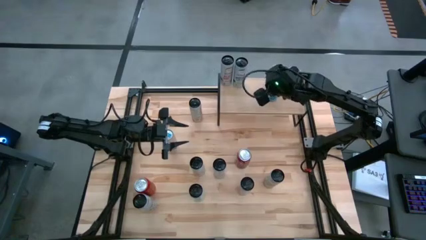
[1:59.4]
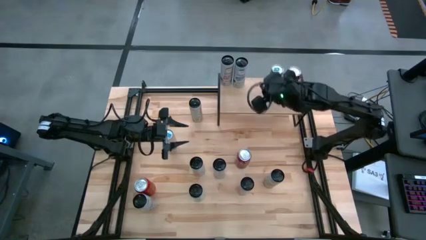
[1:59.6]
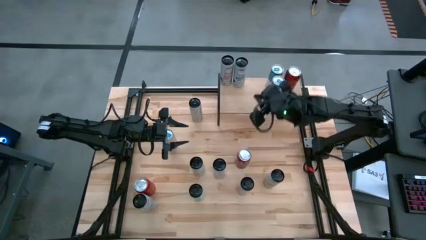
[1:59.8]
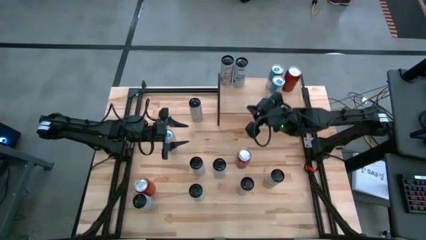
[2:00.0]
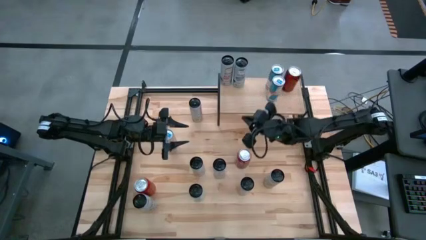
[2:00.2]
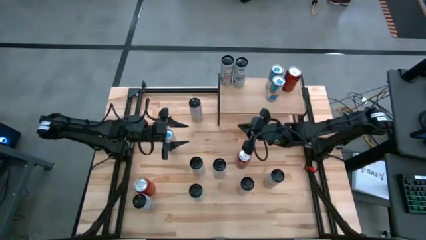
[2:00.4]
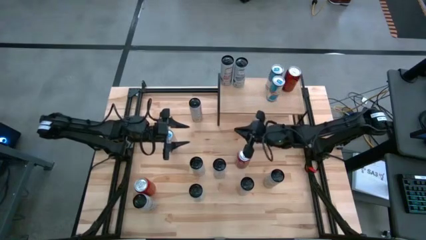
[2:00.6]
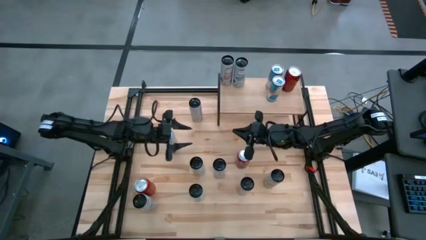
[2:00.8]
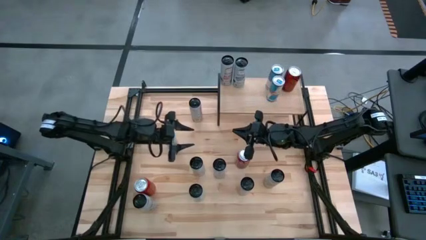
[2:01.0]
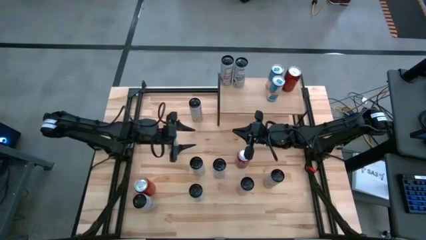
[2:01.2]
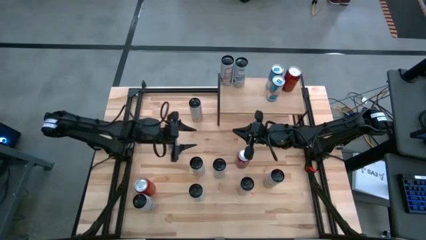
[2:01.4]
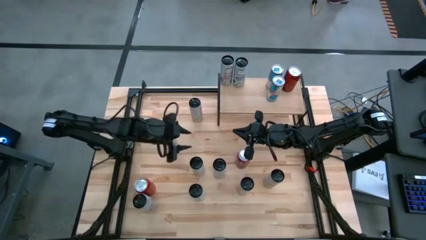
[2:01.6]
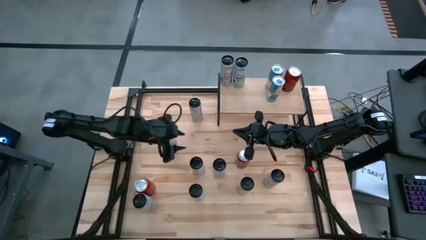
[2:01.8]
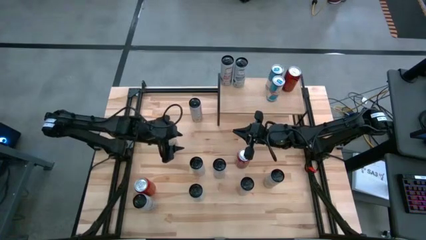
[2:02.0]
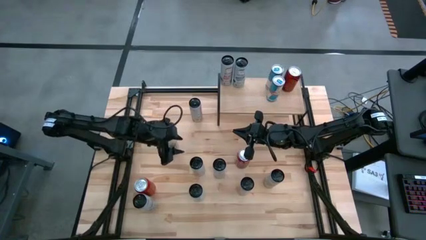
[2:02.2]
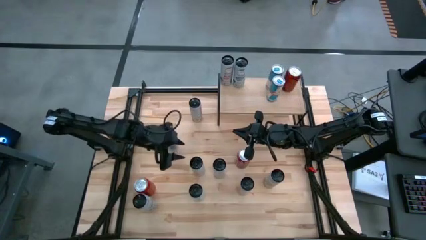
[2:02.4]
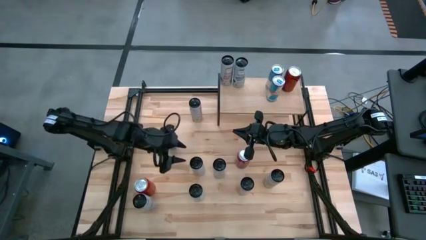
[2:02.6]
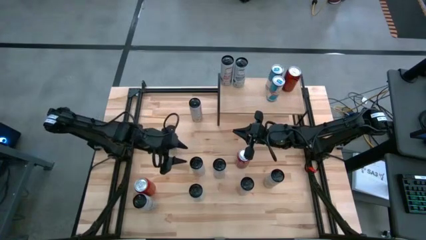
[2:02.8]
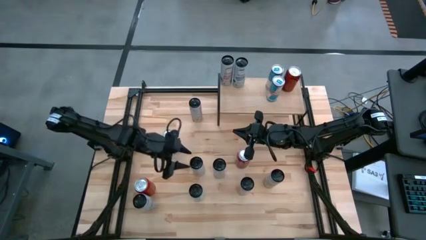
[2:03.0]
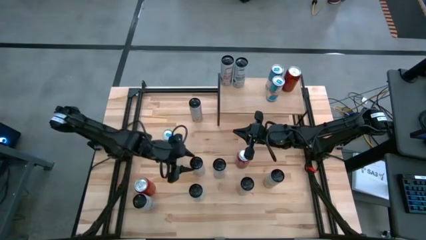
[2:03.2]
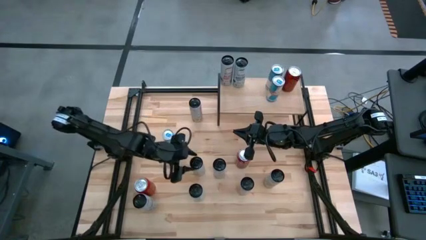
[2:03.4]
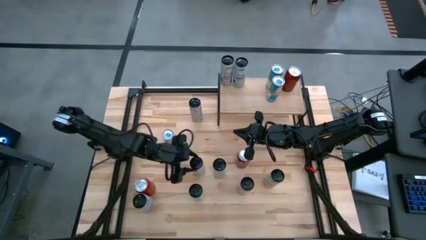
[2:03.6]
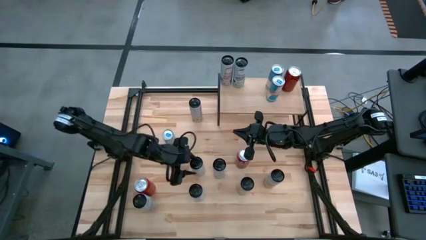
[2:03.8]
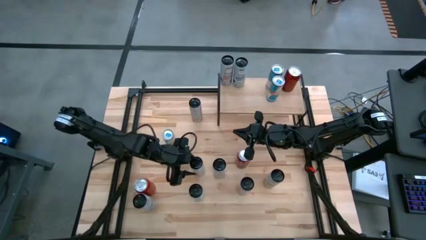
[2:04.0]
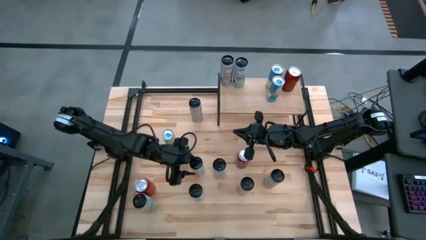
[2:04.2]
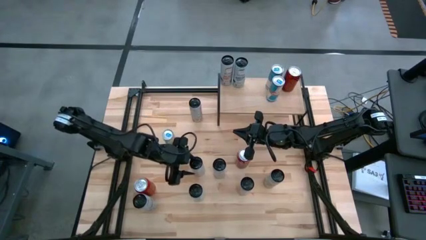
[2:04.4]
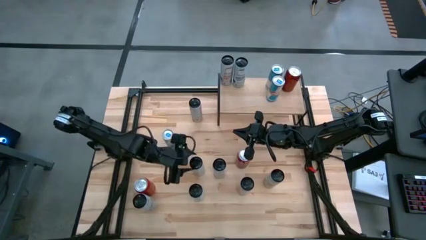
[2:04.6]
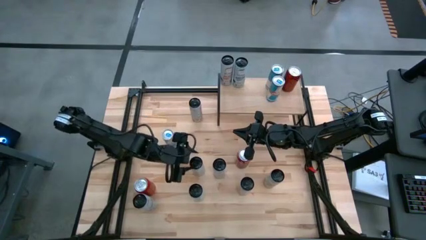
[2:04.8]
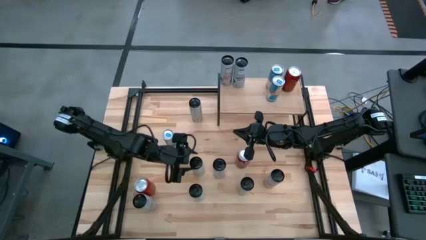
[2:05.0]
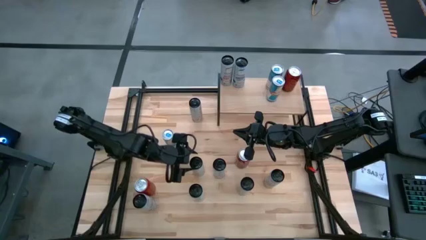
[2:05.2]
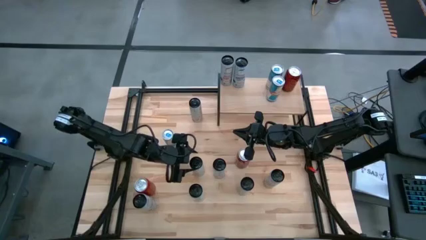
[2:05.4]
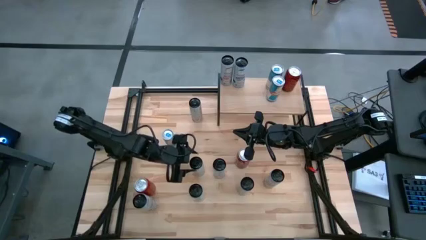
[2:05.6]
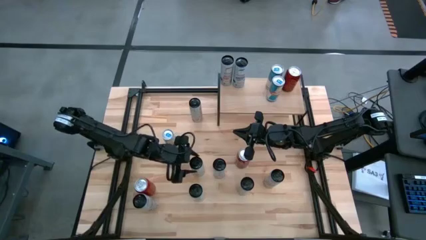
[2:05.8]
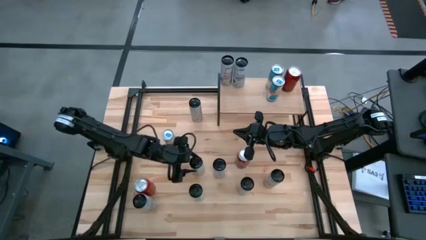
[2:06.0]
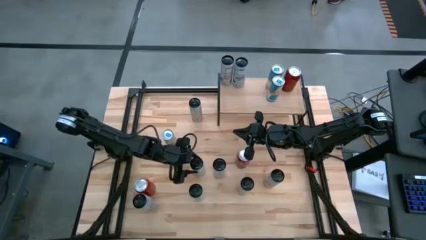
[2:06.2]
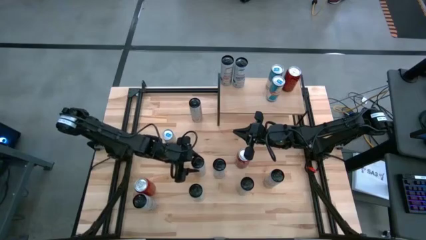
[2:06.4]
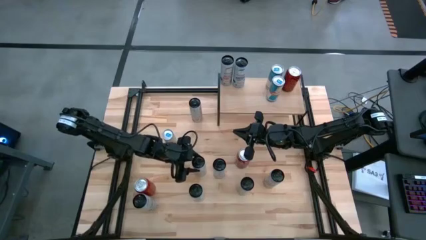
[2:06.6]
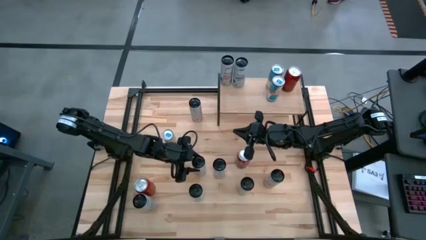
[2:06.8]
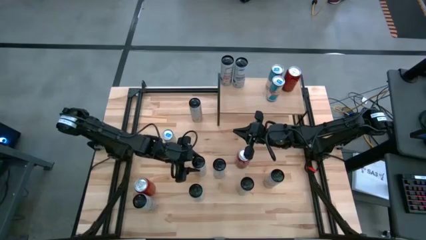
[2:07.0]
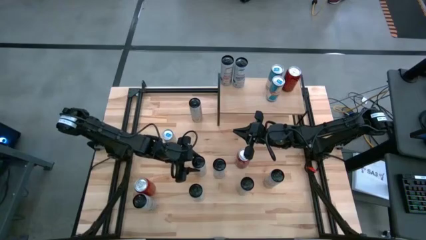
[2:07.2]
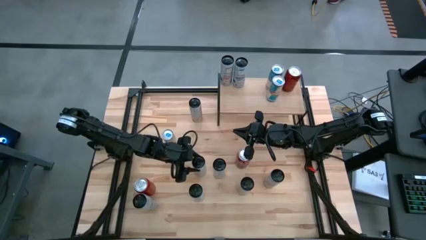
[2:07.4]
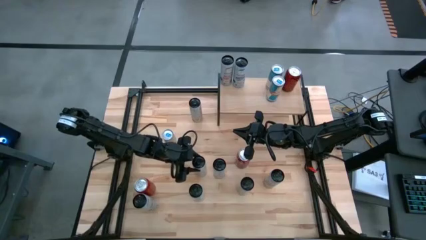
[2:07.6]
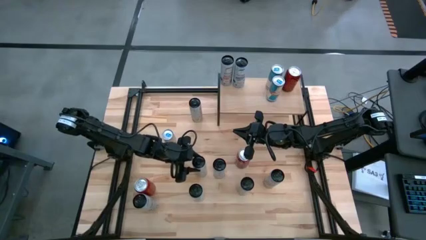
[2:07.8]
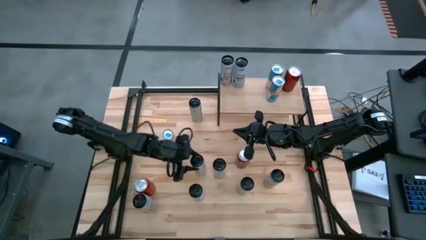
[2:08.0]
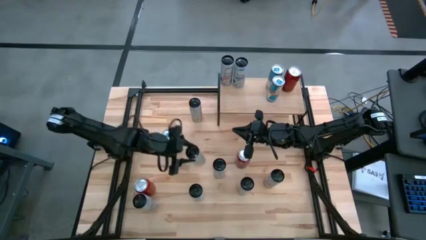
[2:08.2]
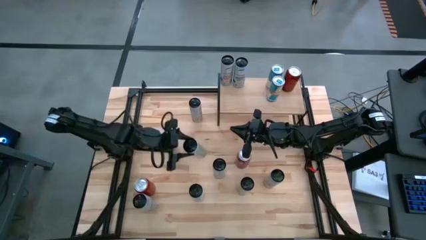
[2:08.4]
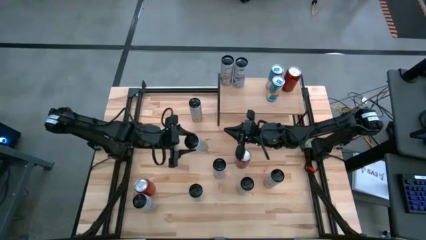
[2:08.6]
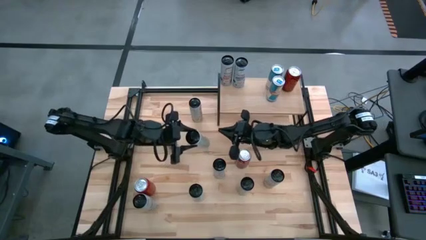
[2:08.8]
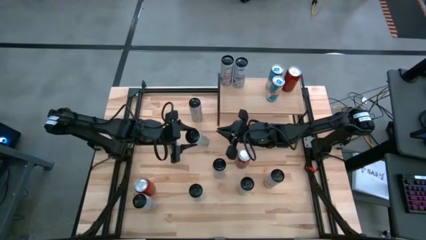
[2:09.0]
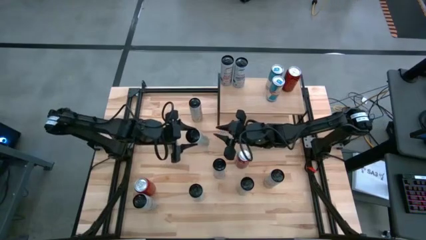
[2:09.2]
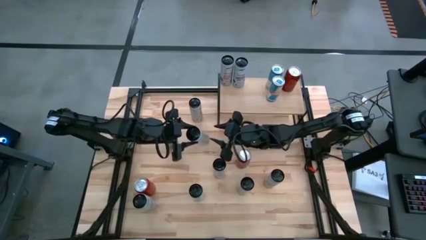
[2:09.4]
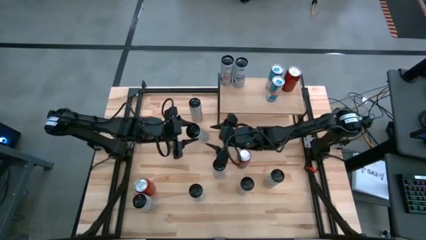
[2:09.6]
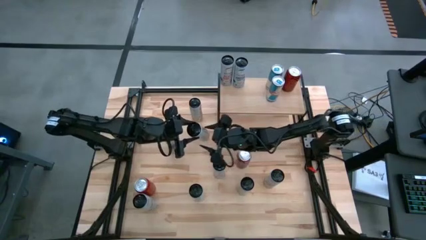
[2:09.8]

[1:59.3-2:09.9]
Task: Place canned beverage on shelf
Put the middle white yellow soda can on the shelf

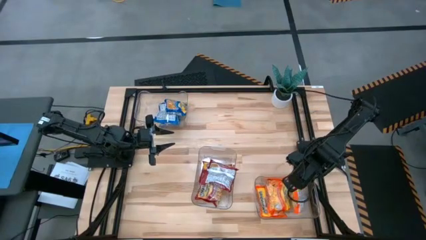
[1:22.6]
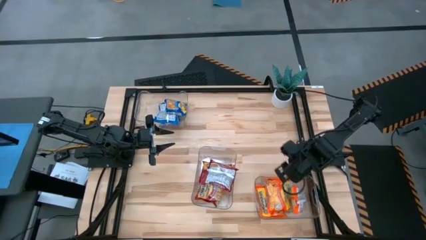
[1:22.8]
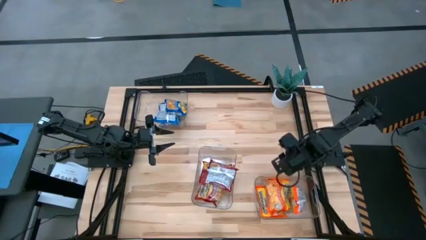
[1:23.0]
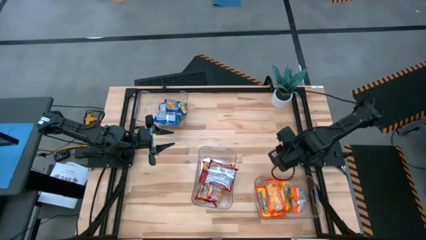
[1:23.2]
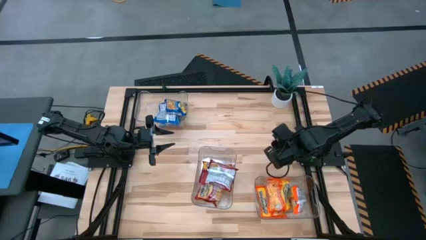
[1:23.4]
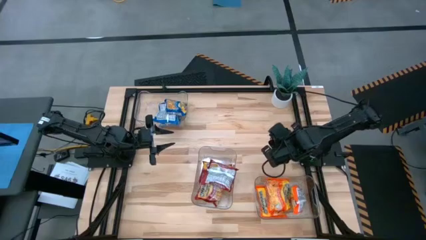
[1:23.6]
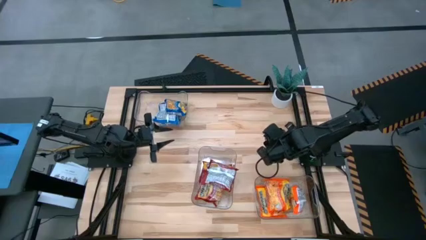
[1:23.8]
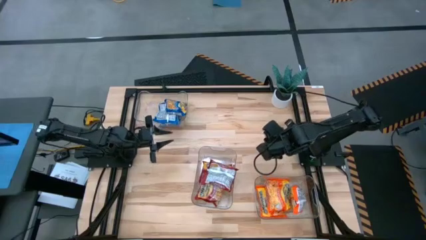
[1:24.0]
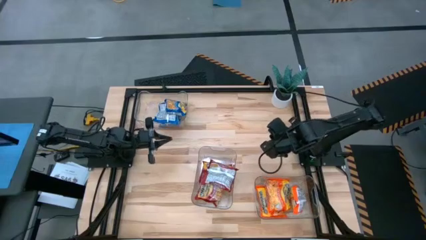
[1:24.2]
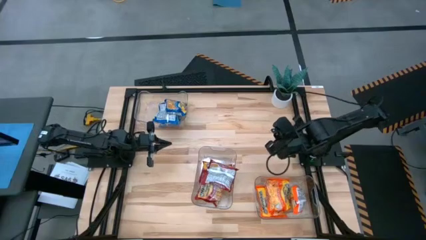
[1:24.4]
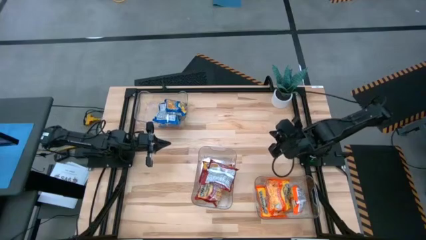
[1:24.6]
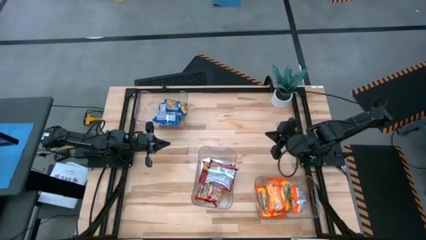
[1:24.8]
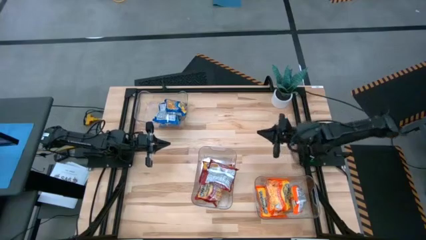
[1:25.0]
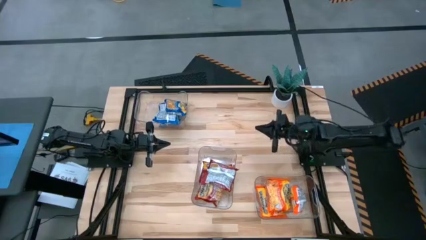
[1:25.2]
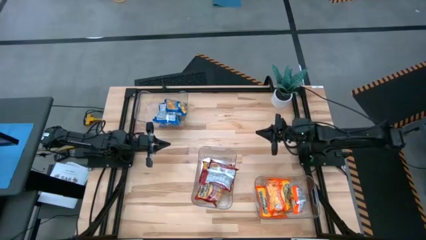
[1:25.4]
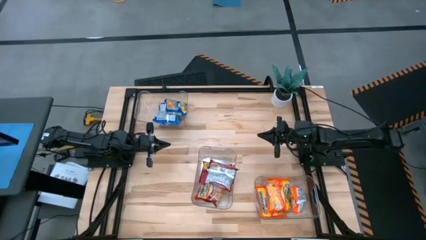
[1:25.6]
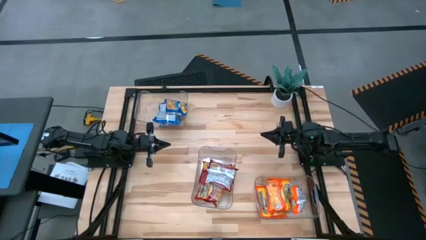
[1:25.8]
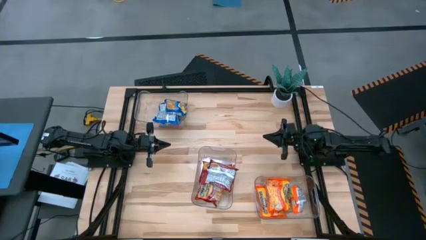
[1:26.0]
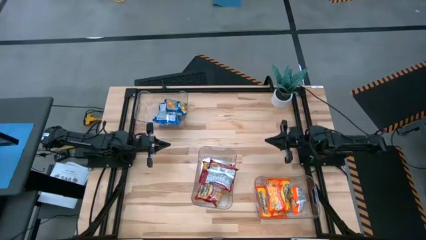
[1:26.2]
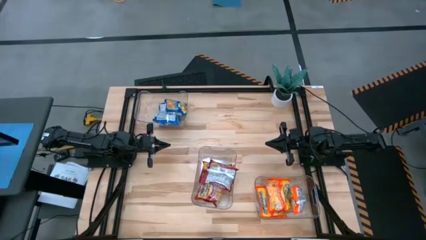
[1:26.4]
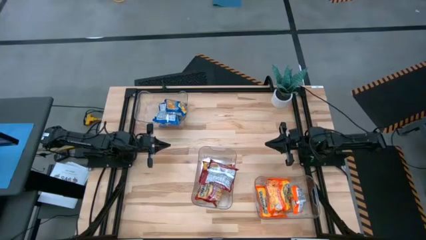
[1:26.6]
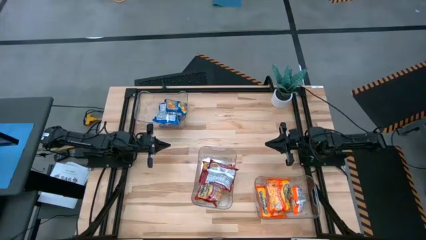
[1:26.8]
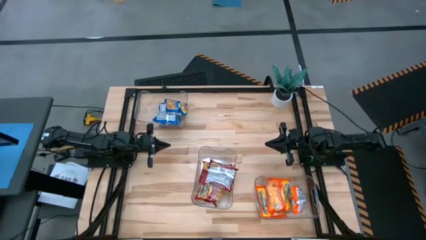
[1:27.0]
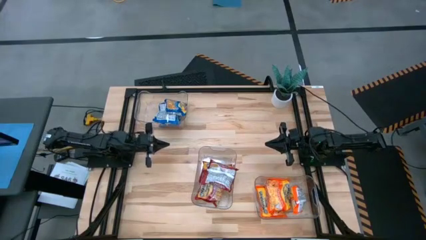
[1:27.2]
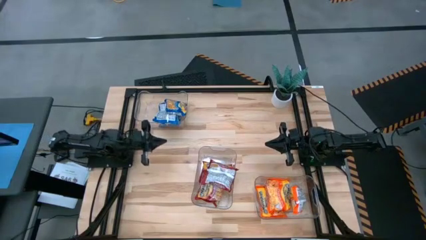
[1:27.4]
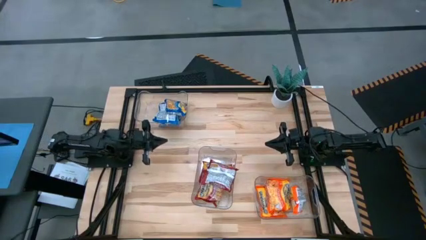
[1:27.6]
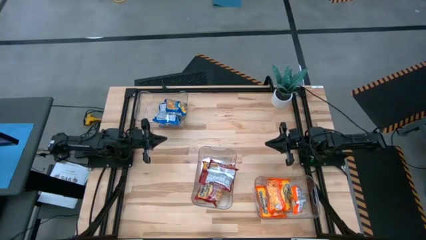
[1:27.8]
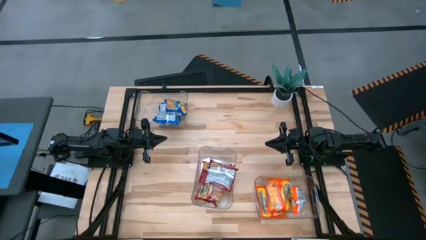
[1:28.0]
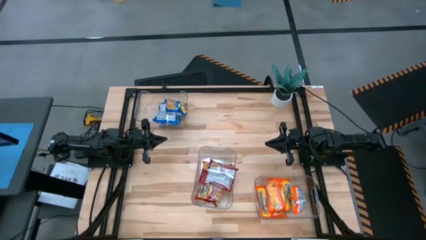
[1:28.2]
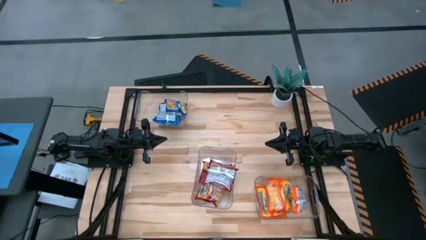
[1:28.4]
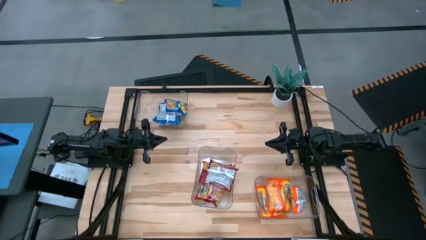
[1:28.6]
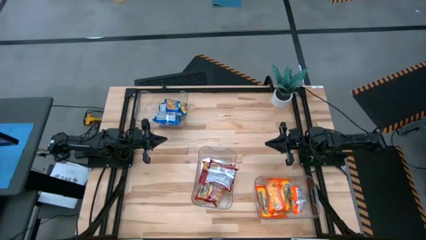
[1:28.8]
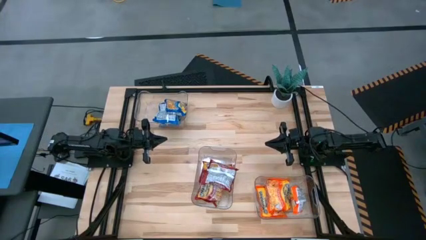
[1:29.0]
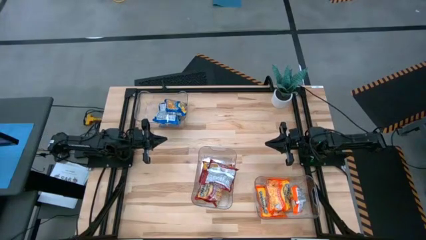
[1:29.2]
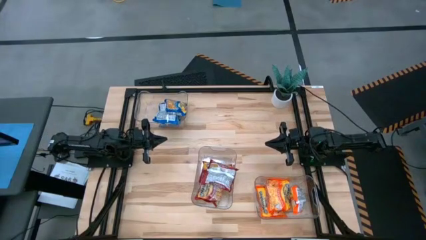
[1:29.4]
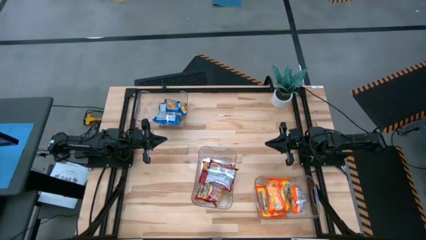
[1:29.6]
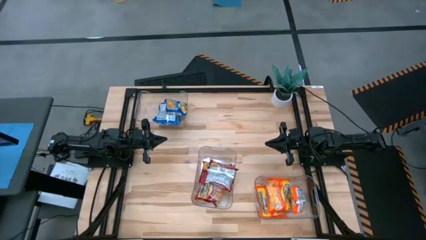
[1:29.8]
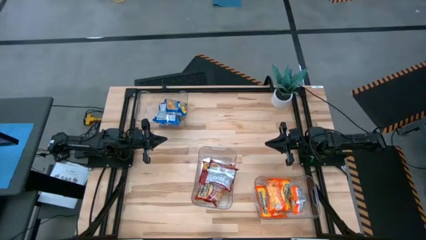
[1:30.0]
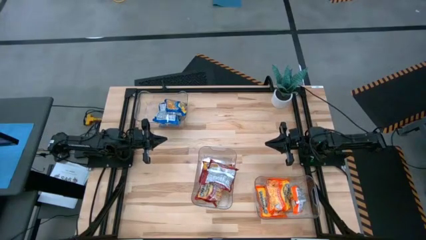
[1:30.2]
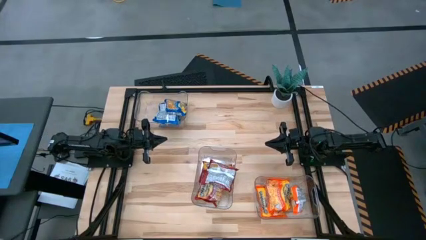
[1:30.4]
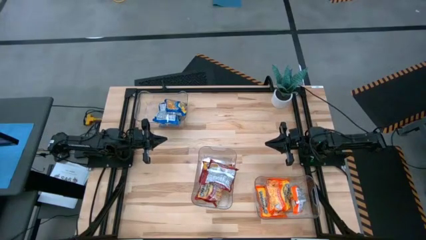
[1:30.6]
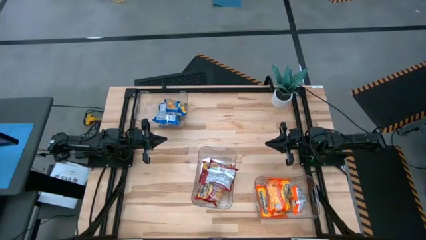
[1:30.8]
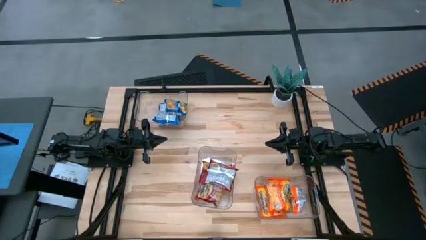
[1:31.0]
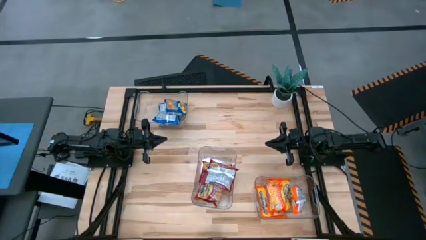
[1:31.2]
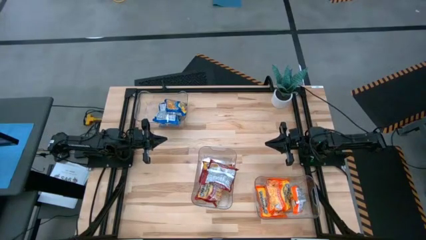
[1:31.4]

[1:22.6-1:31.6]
Task: Sort Maruchan noodles
Return to Home Position
